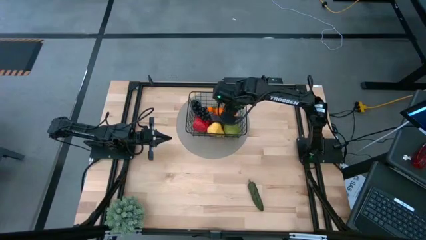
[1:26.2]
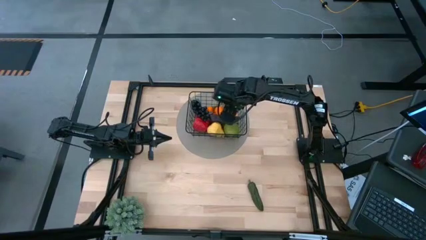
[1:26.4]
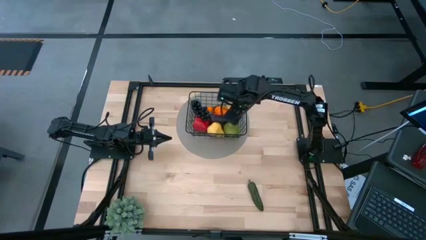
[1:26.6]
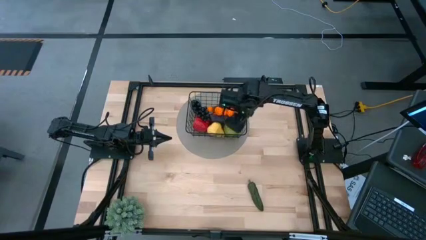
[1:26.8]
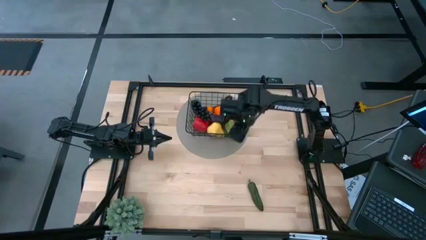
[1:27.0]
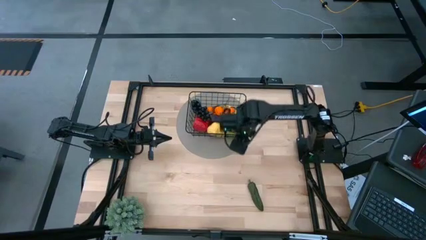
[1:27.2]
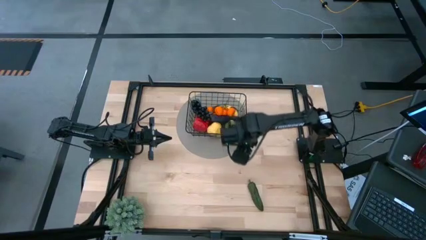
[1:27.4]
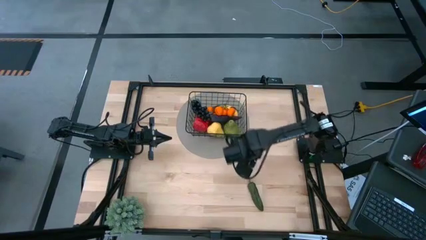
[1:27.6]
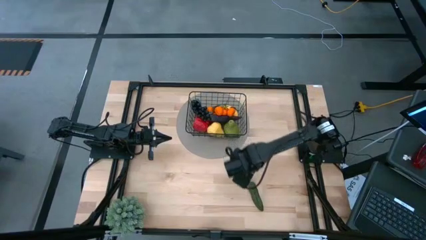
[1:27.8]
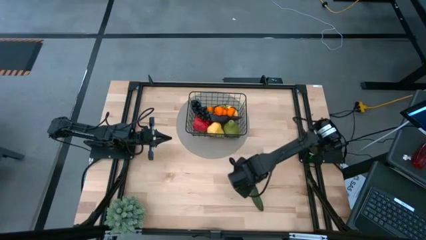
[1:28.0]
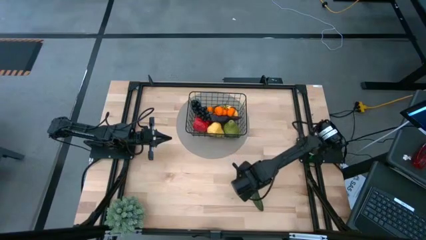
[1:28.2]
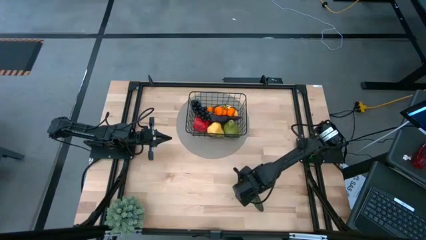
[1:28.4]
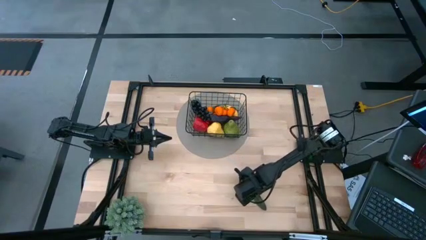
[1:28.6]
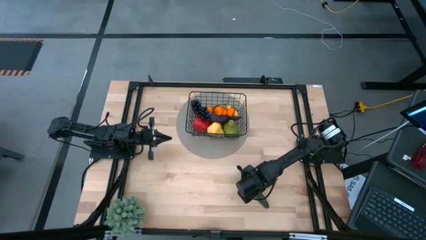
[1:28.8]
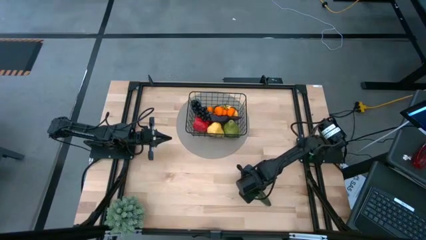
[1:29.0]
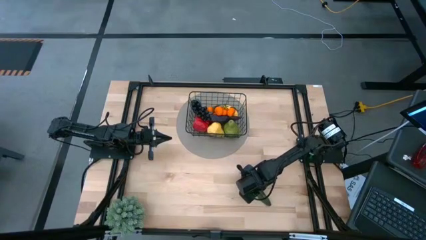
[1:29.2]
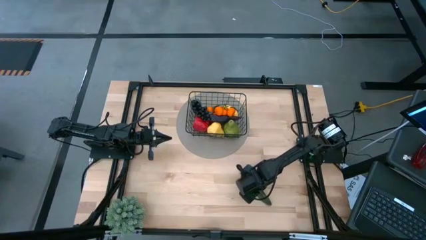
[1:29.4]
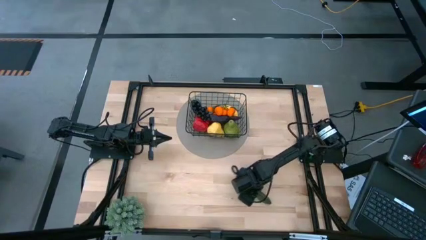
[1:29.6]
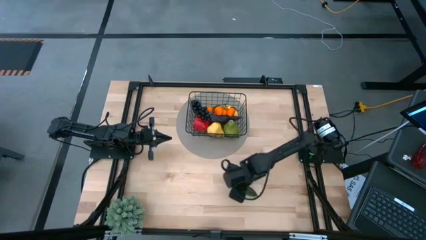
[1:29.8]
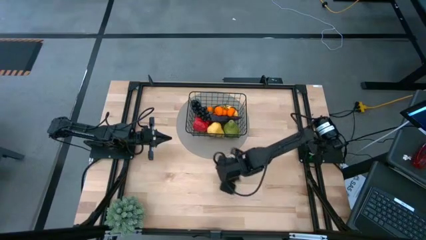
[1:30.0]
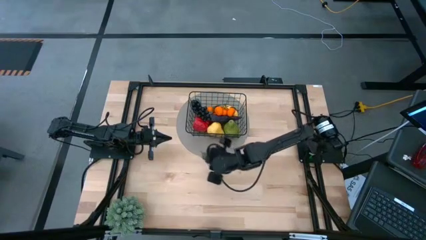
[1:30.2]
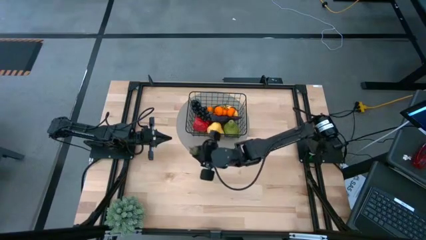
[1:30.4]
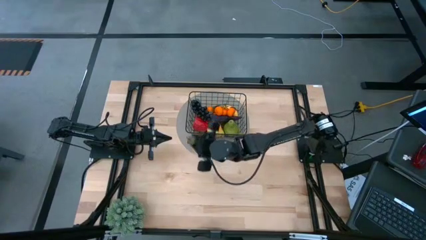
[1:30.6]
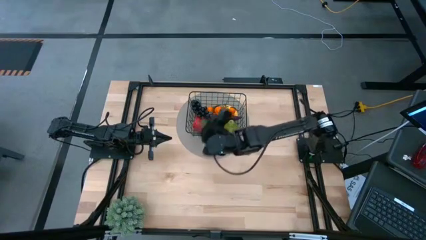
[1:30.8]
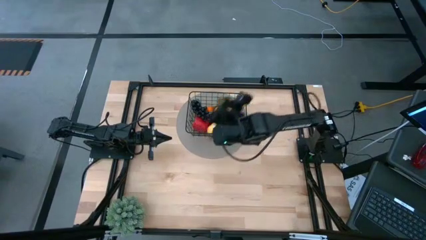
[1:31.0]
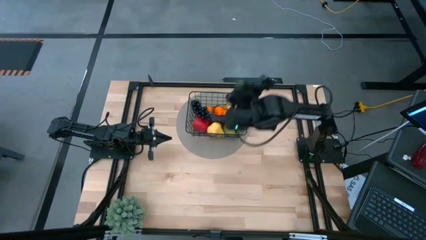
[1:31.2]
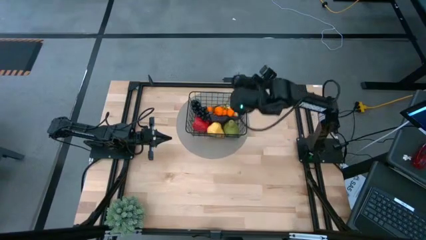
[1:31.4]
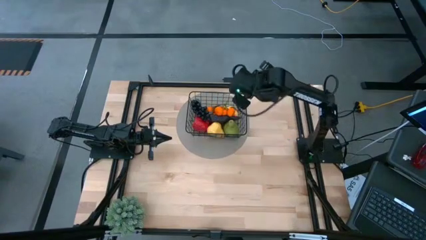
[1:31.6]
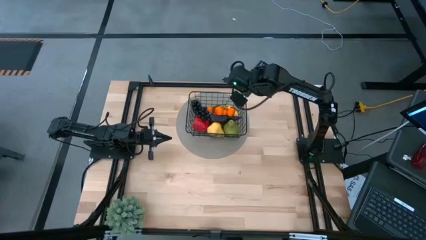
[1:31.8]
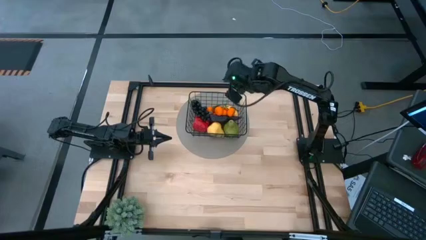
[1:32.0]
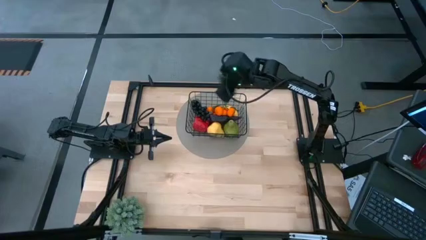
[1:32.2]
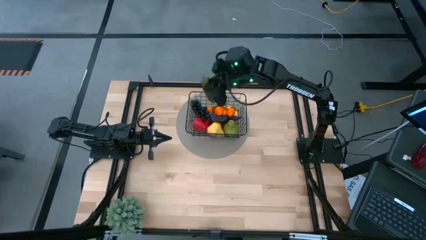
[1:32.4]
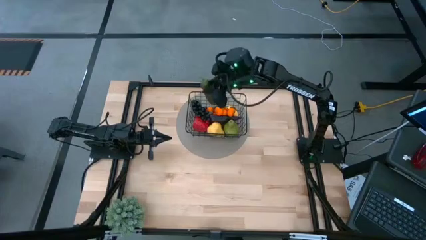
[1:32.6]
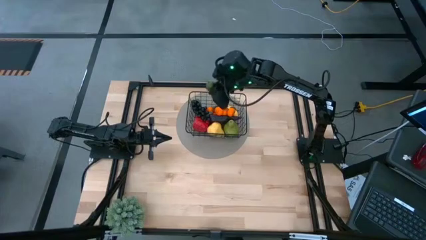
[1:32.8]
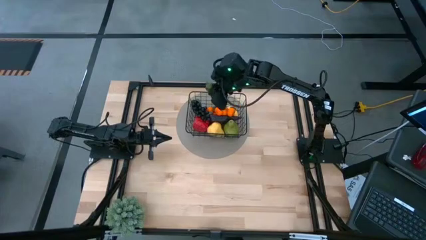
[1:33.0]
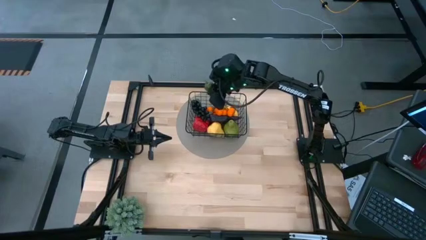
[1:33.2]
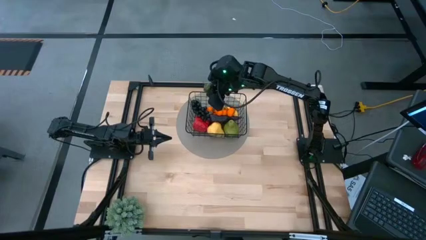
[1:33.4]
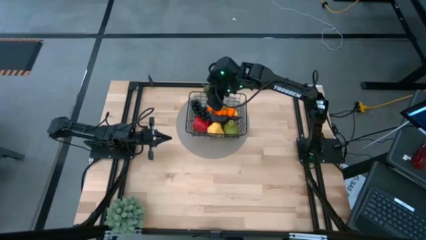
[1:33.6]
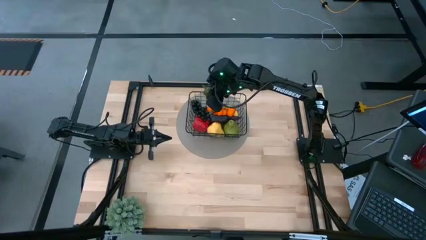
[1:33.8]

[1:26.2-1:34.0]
Task: Build produce basket
Put the green chili pepper into the black wire basket

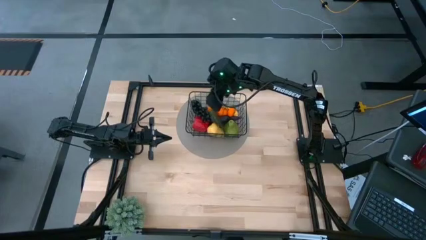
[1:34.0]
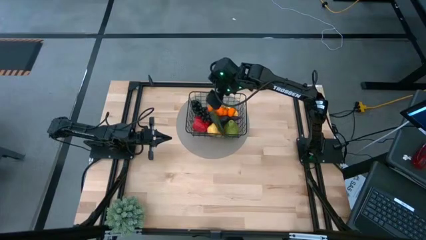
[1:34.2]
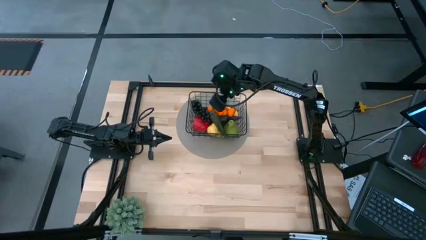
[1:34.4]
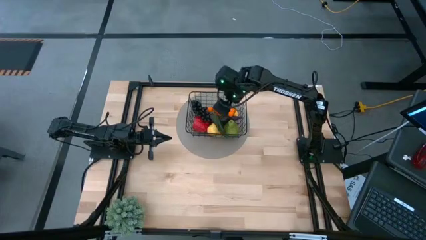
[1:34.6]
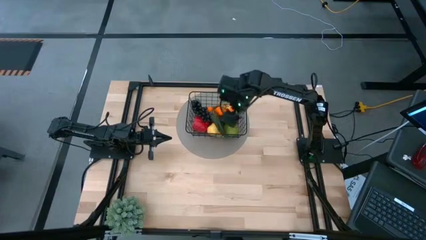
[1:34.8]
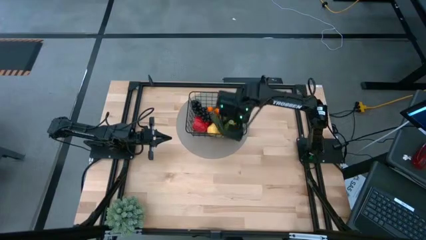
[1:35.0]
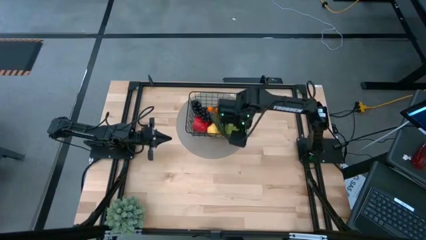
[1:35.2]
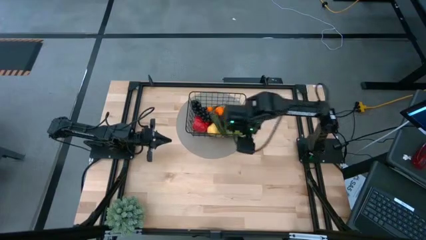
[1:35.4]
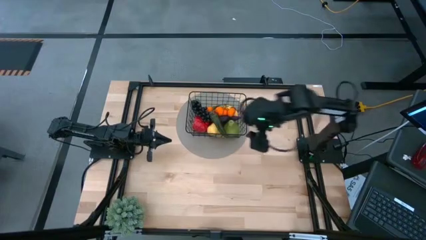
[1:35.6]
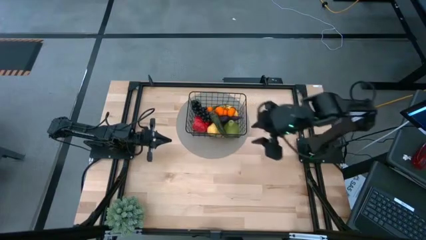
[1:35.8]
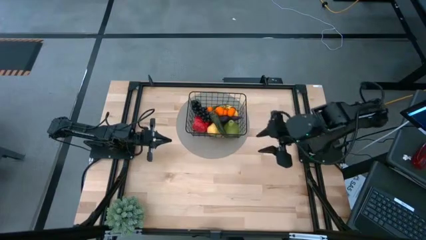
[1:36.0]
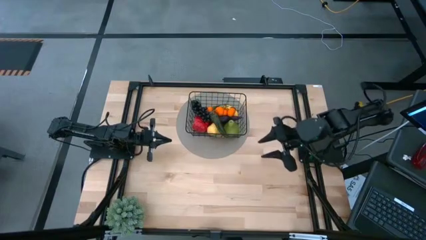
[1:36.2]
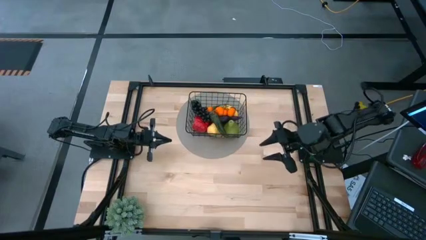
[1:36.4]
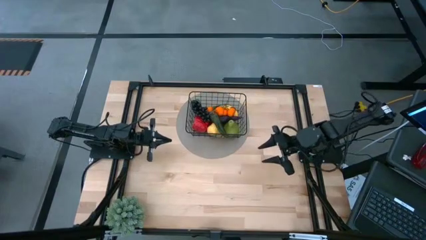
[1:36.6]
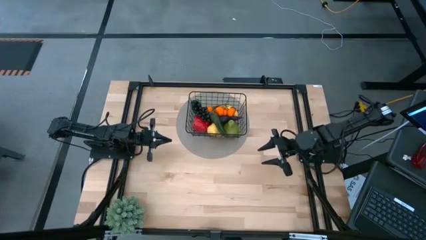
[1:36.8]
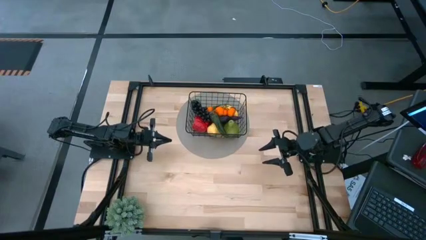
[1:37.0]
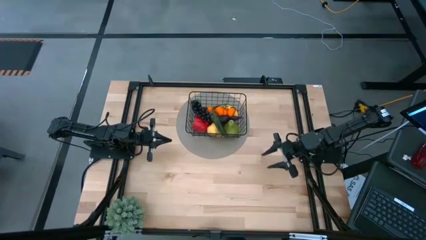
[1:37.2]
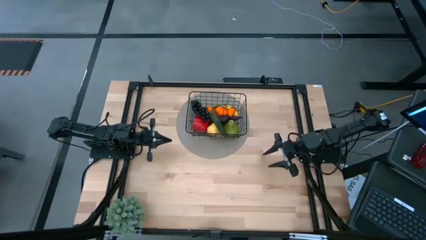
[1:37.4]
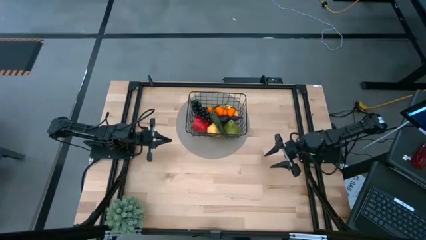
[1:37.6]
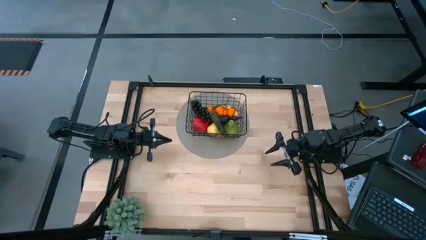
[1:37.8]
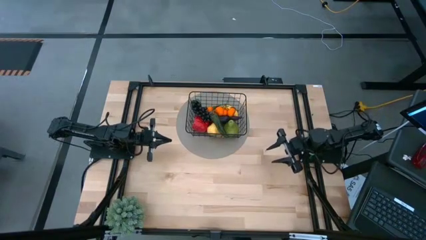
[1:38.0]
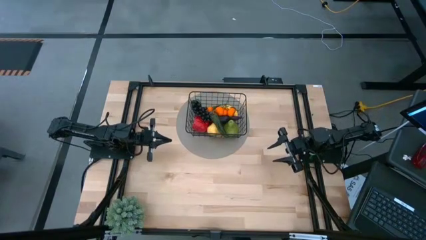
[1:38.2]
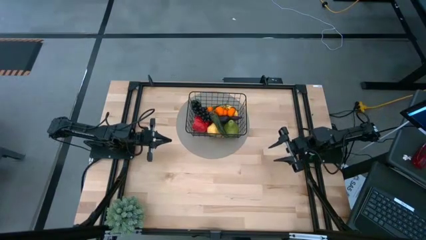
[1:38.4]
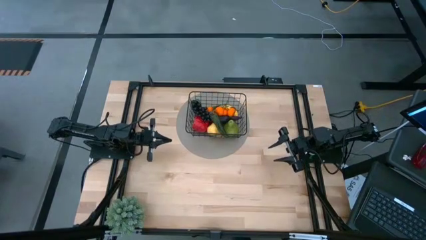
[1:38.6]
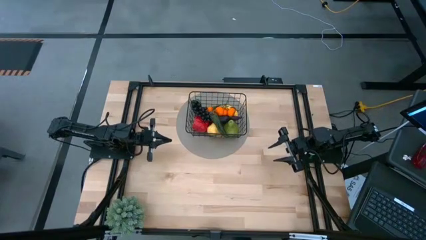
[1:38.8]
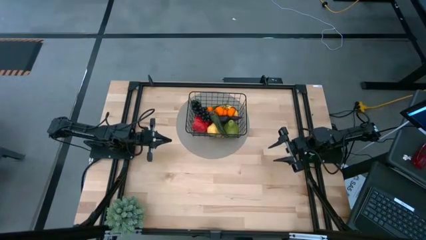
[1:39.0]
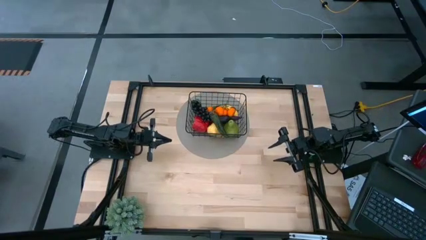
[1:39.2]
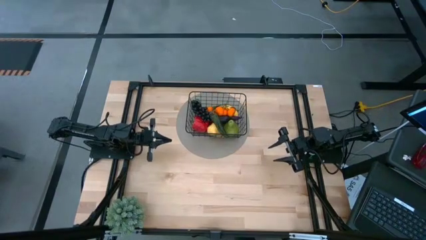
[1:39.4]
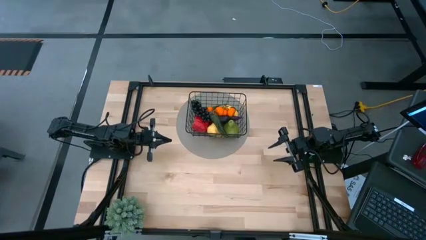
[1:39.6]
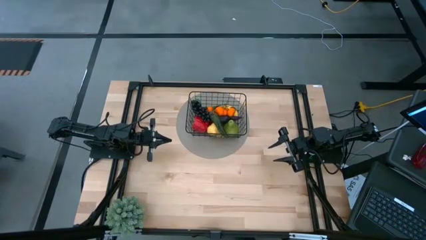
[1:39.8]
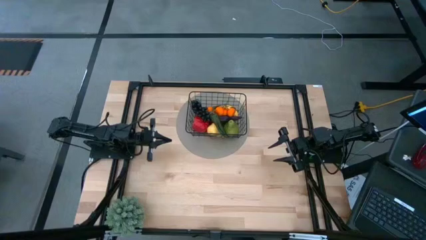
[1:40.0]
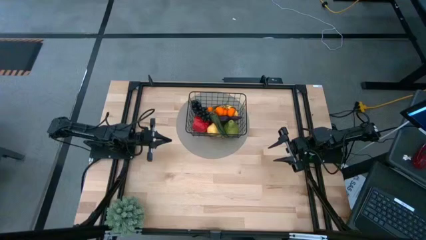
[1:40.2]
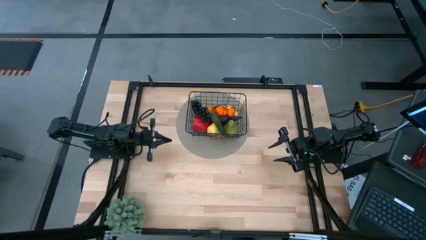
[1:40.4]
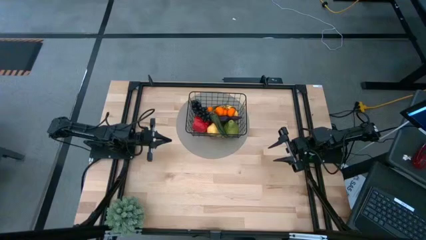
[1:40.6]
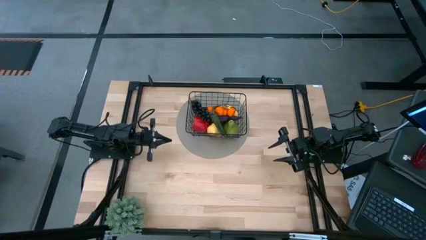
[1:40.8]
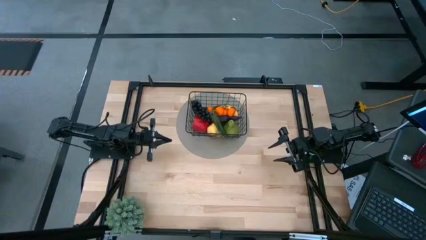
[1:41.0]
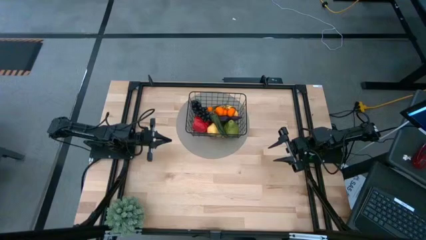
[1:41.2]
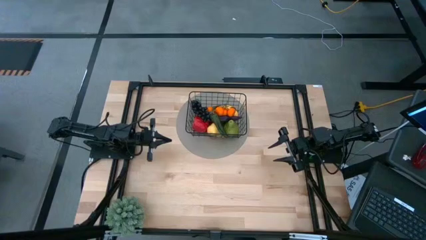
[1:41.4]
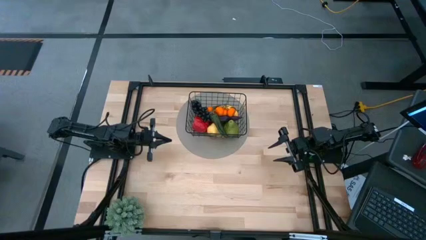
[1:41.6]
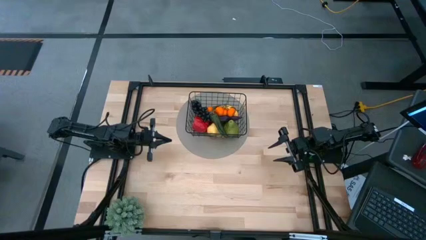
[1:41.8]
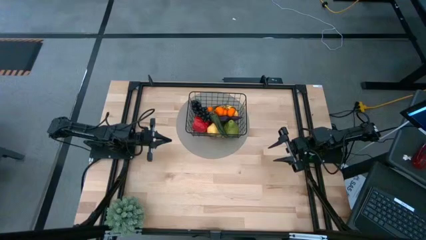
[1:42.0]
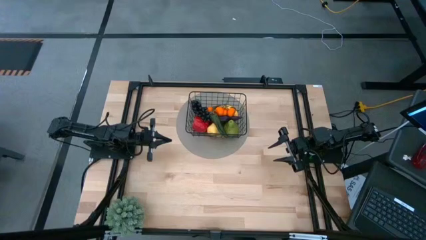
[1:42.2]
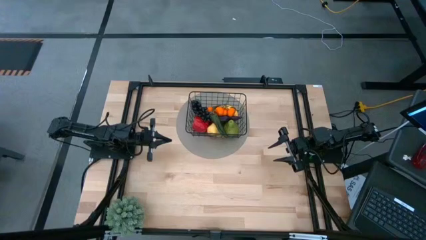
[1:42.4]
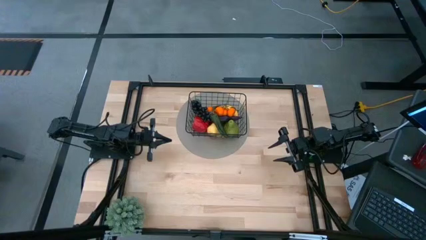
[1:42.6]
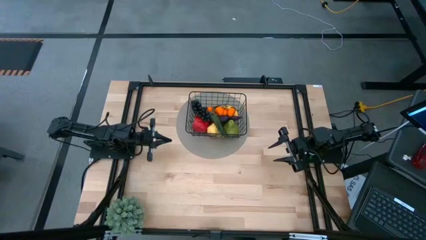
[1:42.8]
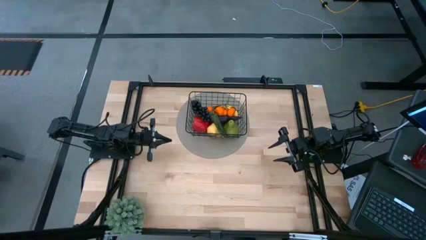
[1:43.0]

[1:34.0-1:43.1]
Return to Home Position
